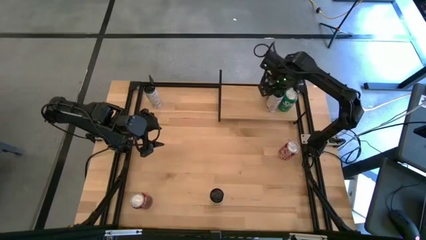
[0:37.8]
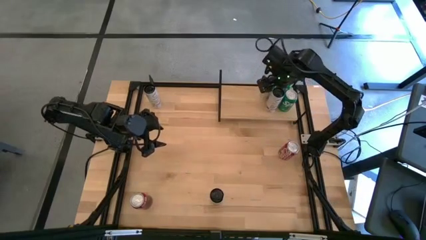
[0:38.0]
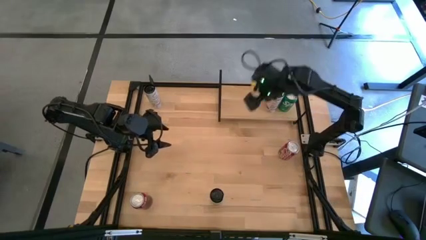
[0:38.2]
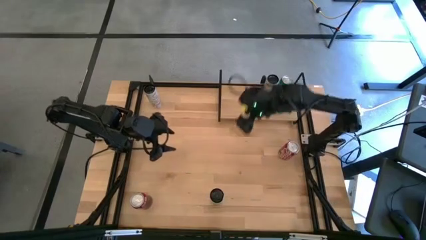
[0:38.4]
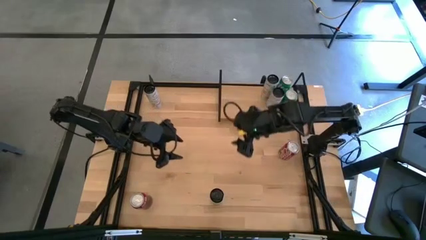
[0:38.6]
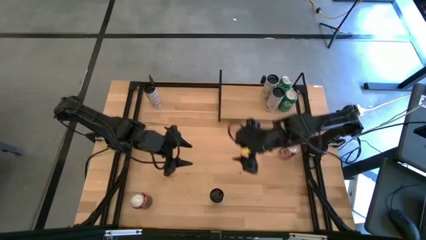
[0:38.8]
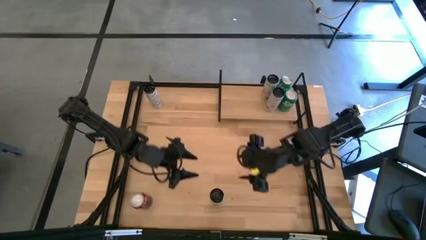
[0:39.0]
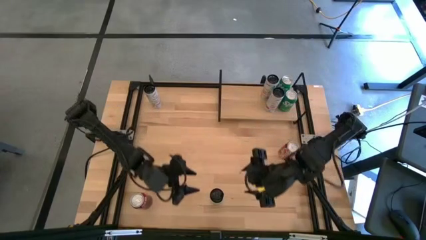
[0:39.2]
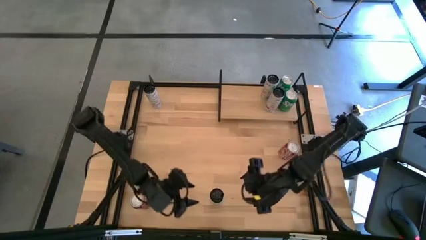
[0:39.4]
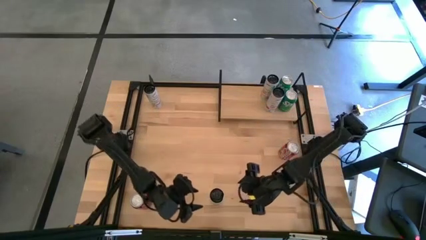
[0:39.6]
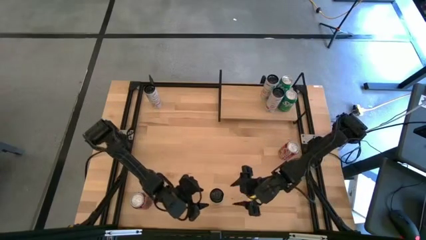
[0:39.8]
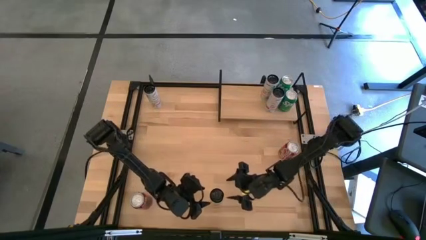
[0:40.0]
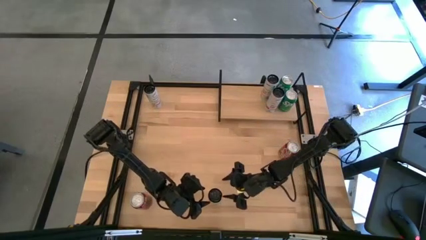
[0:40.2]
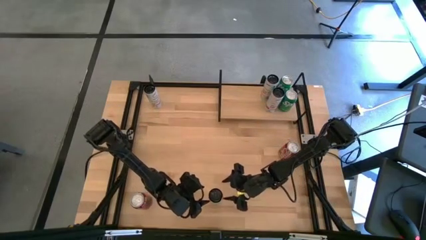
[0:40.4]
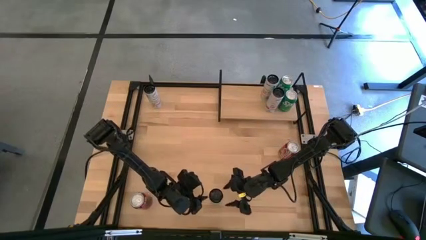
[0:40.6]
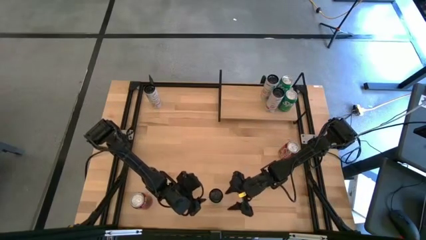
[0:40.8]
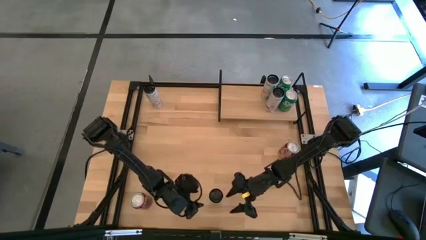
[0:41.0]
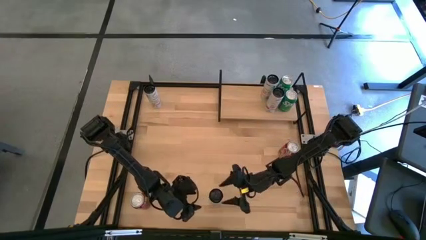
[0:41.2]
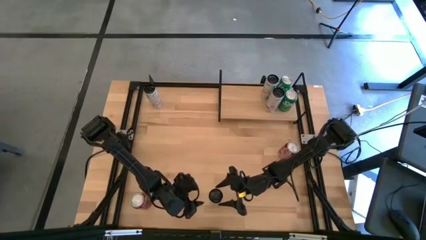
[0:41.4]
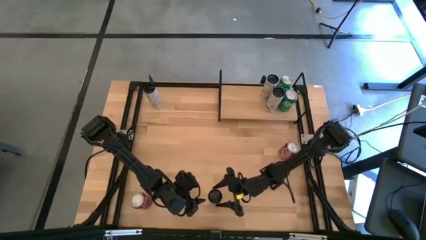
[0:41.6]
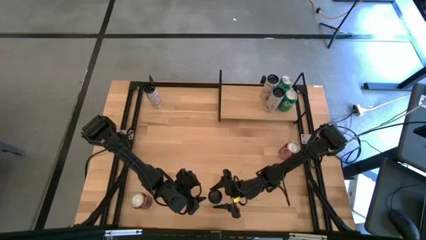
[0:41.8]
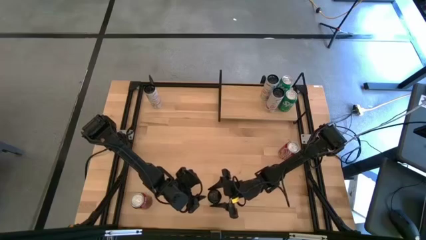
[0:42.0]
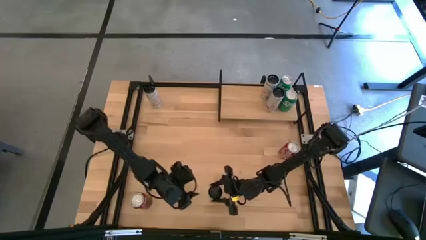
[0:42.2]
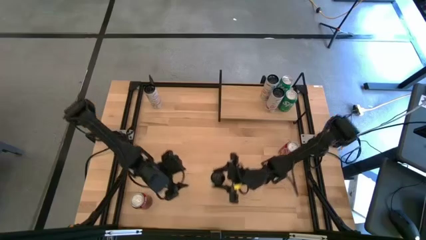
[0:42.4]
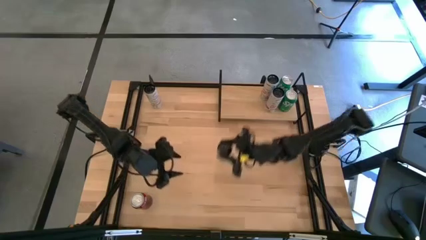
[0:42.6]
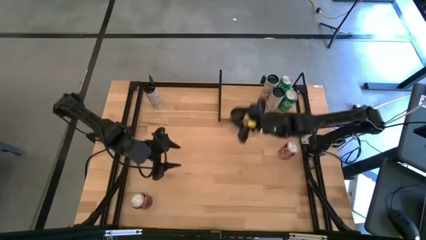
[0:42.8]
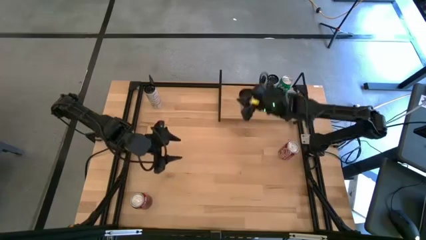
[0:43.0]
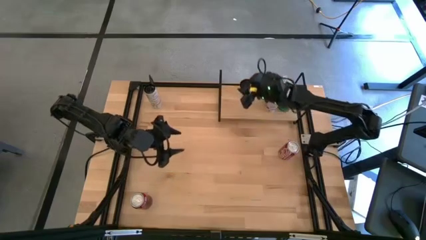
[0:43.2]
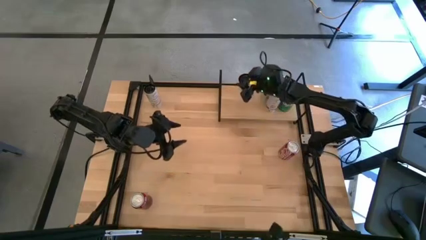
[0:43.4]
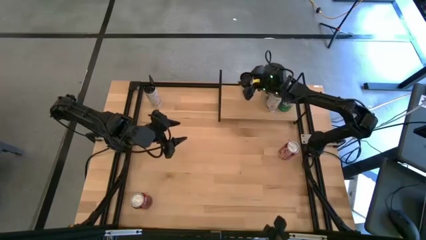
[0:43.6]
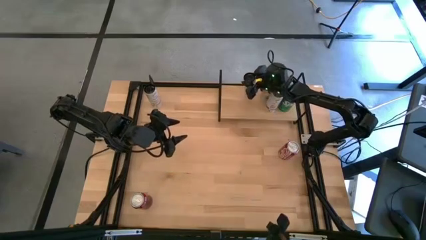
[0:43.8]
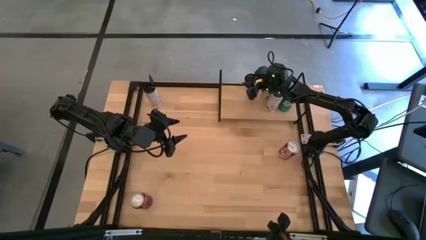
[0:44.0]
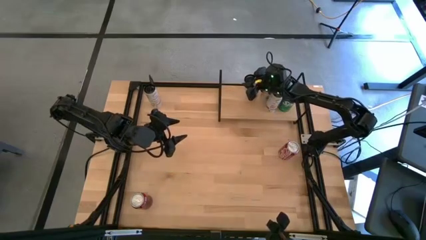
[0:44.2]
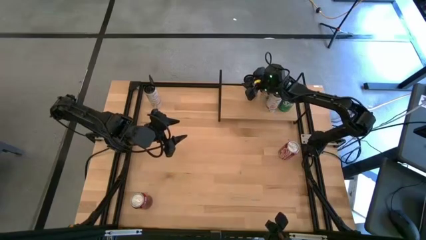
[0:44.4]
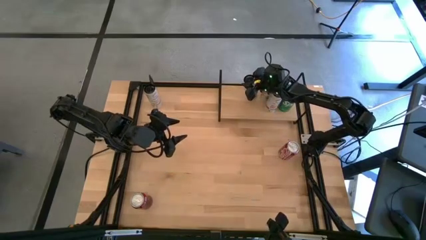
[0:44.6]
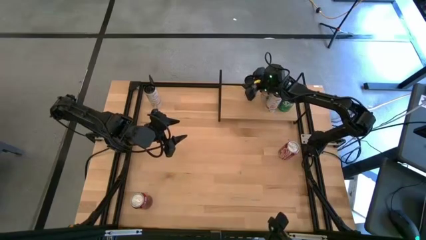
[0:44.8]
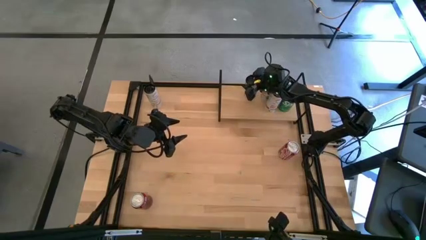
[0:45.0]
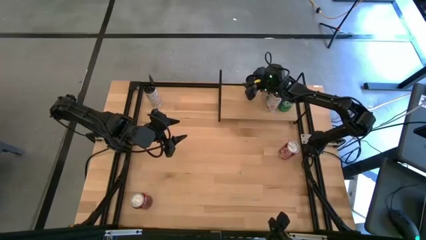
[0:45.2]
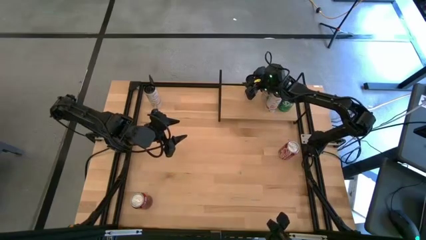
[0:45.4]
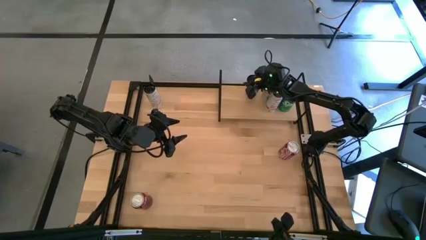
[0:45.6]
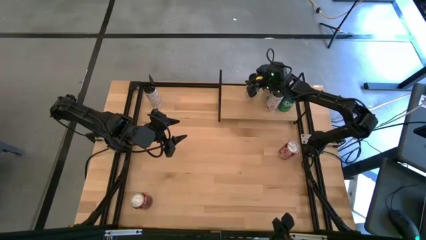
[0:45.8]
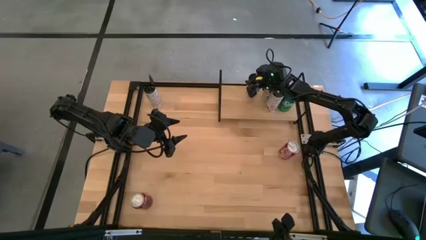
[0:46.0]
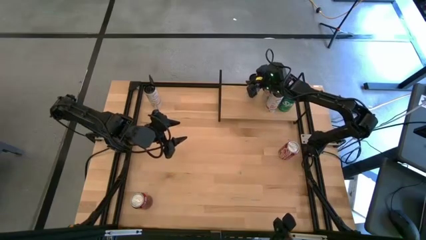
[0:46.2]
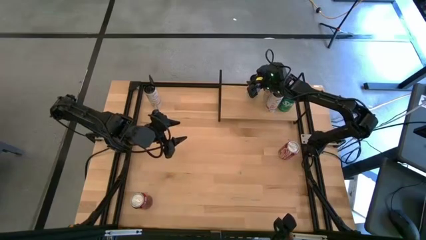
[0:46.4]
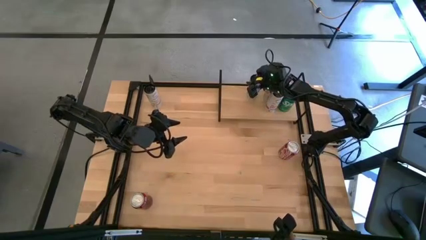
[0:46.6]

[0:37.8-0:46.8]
Task: Place canned beverage on shelf
Put the bottom white yellow soda can on the shelf

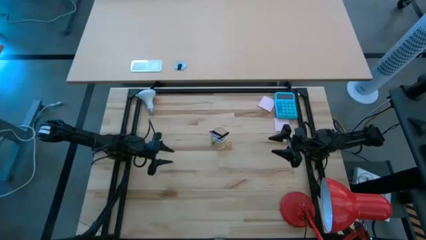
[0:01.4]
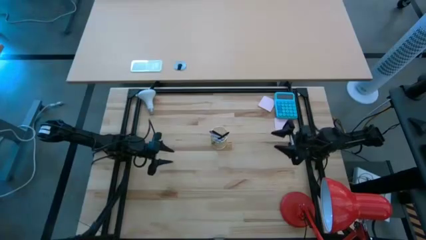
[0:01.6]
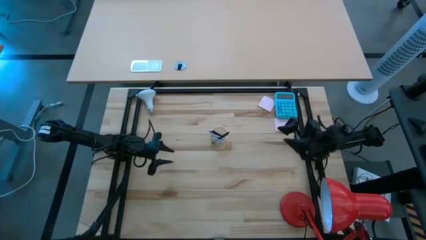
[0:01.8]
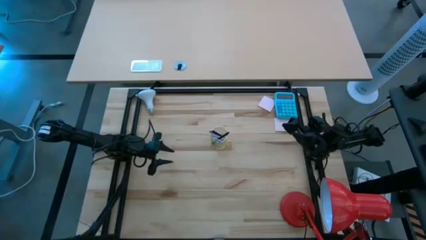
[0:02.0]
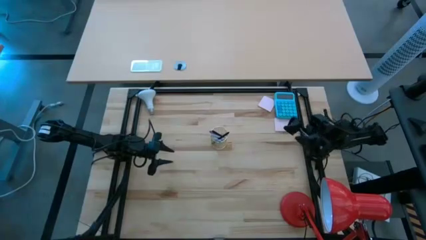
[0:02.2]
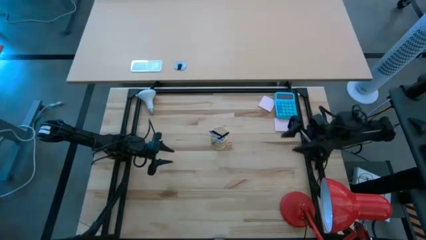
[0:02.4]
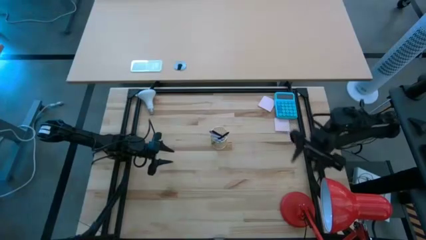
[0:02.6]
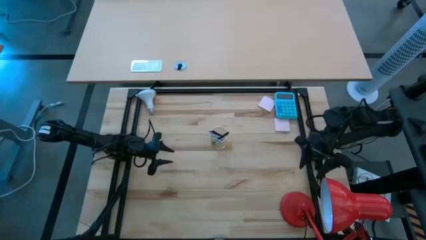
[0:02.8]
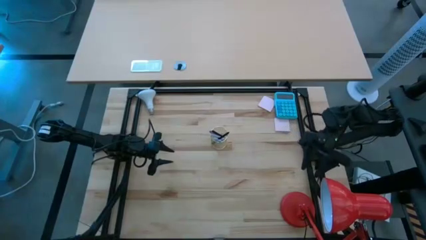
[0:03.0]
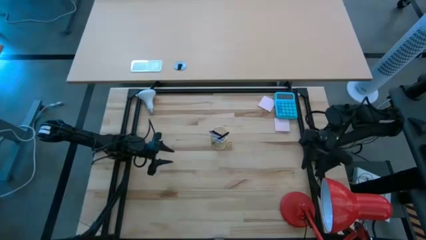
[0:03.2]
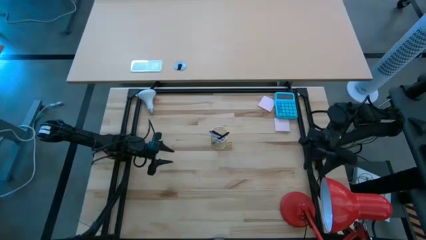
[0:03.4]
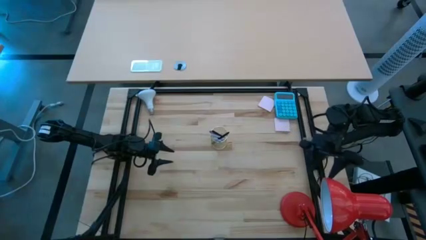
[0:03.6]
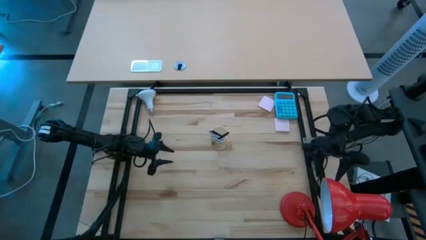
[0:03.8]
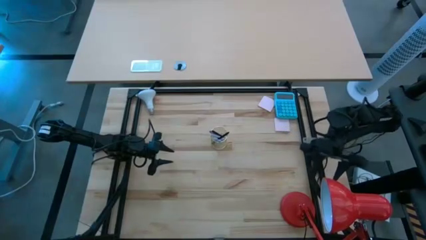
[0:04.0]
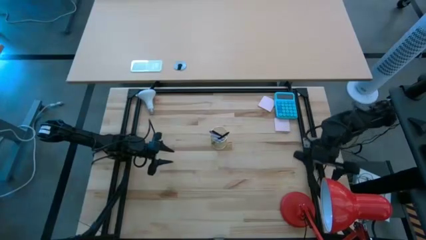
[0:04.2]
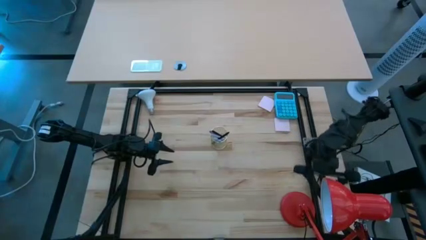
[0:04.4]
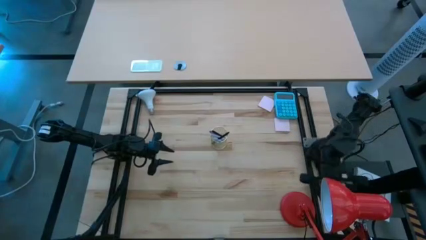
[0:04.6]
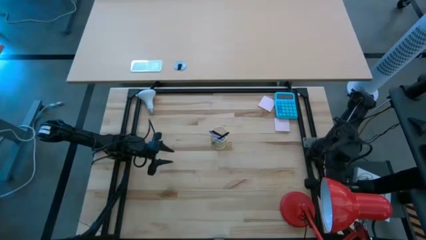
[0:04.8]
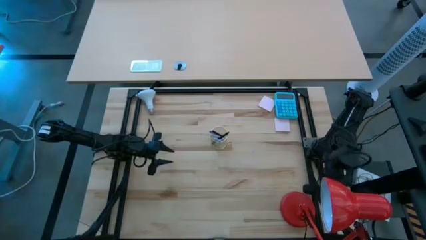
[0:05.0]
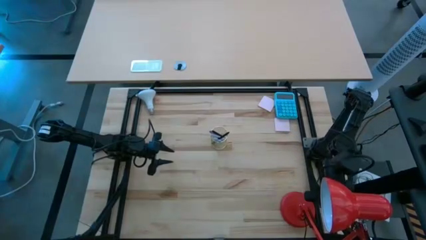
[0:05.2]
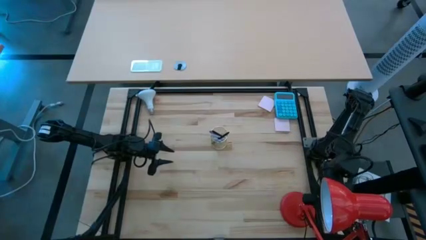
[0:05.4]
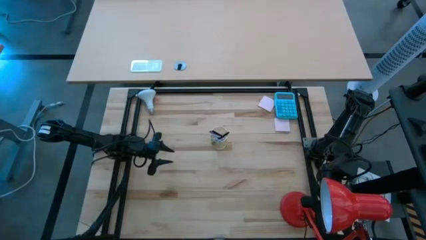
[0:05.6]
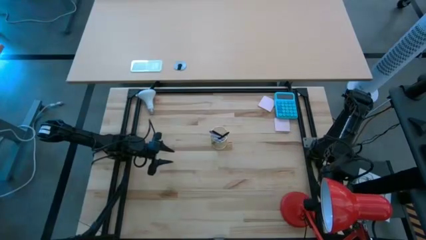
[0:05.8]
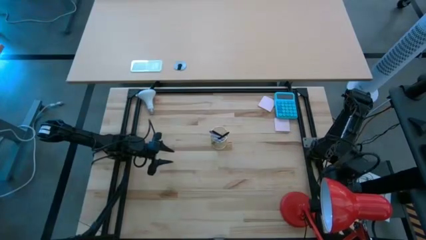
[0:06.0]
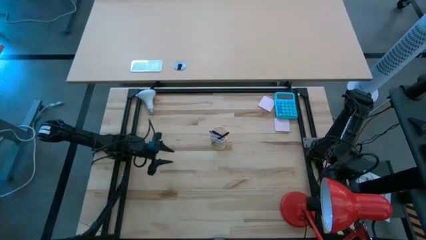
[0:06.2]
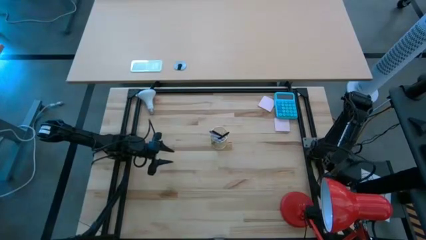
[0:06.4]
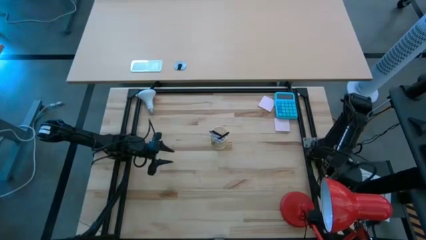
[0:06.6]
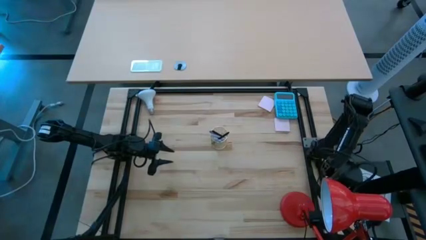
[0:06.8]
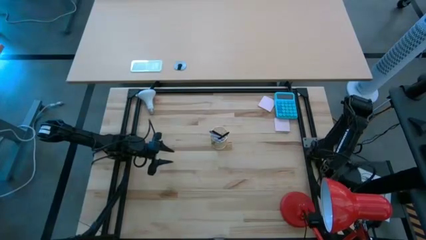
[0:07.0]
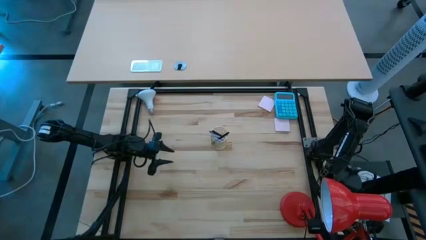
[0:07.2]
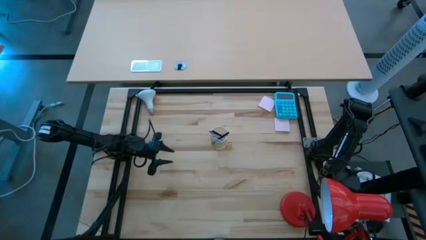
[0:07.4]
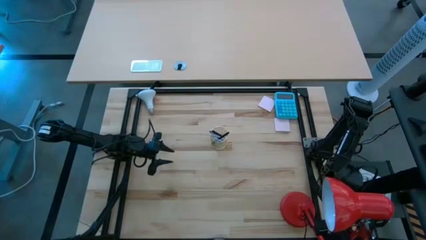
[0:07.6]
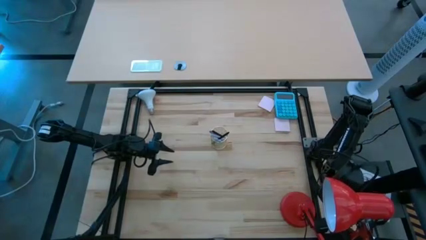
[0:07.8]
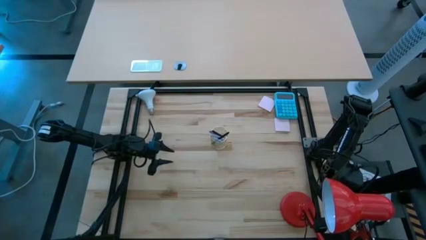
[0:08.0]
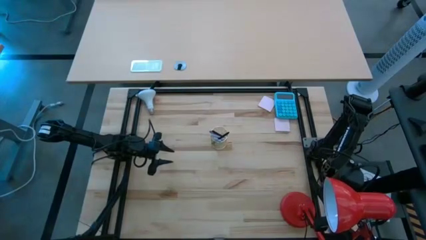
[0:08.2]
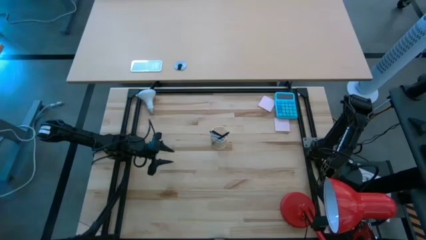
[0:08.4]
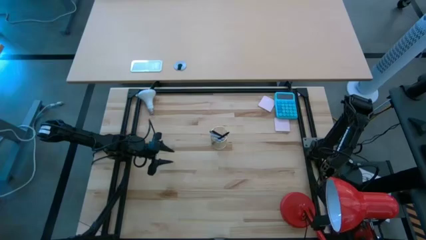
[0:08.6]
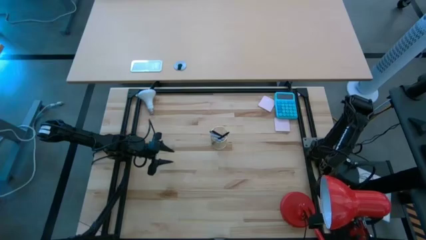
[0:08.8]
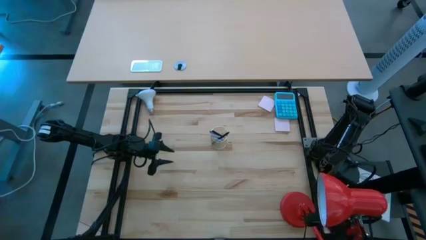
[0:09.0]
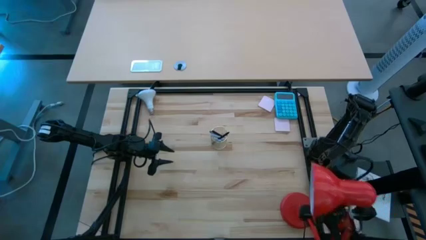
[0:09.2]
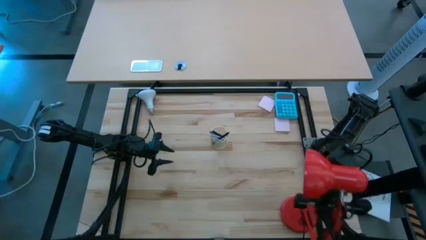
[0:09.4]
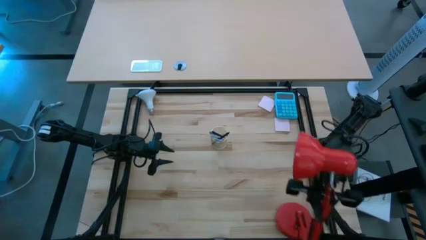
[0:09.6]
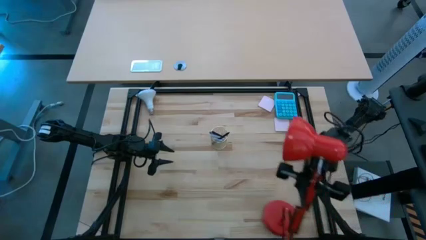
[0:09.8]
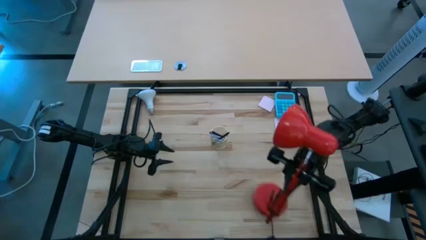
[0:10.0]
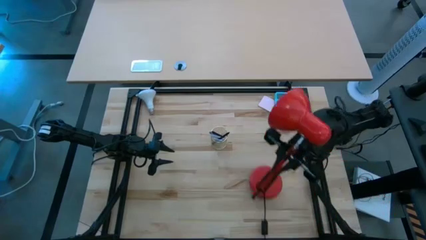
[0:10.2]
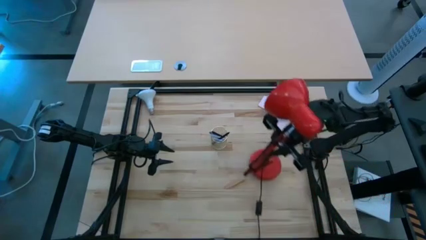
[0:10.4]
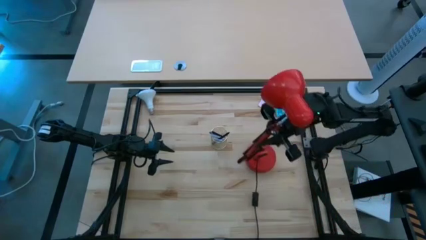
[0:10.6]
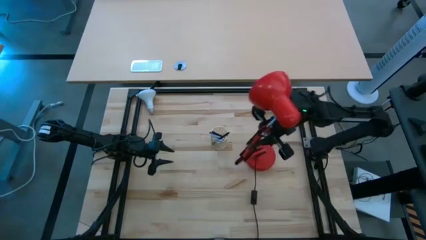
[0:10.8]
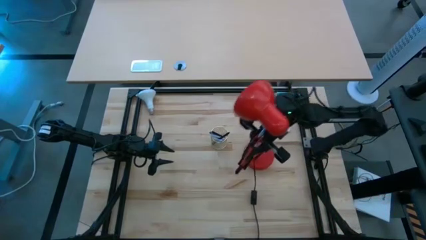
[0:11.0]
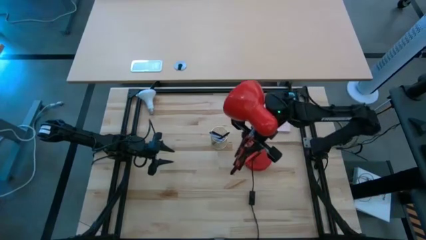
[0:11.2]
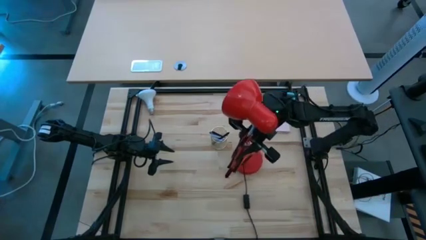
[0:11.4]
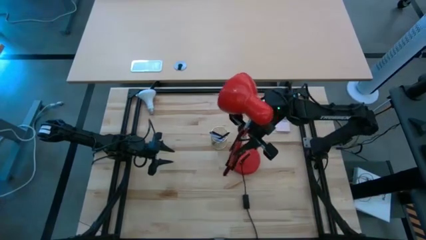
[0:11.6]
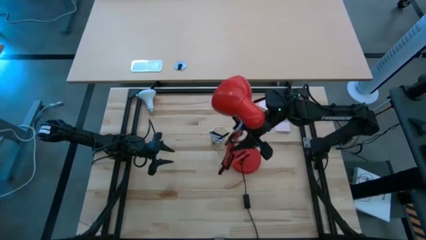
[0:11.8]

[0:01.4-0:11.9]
Task: Screw lightbulb
Move the lamp to the center of the table
